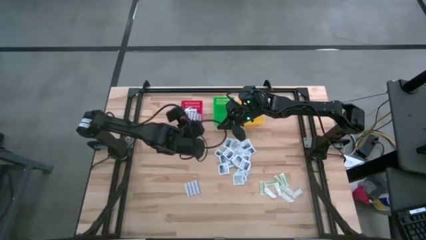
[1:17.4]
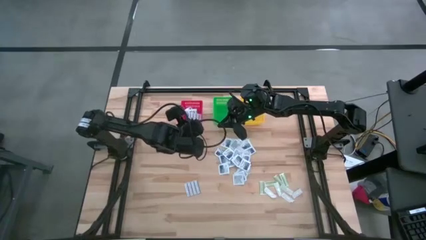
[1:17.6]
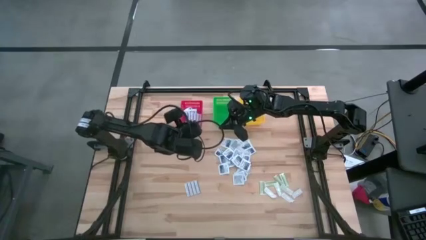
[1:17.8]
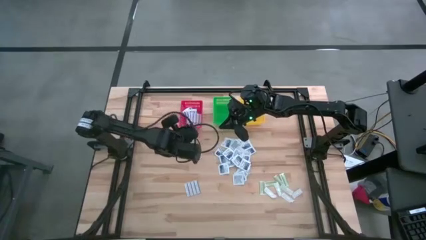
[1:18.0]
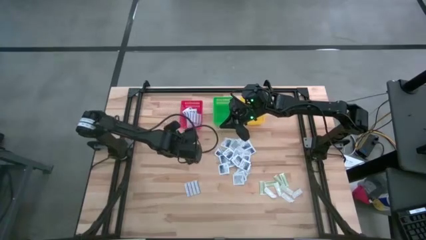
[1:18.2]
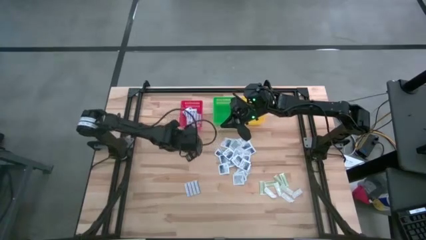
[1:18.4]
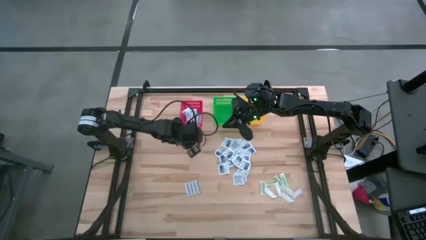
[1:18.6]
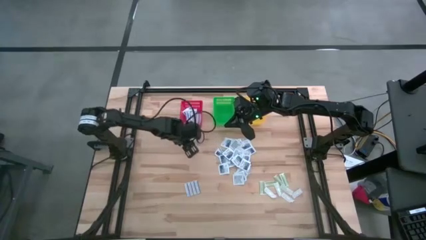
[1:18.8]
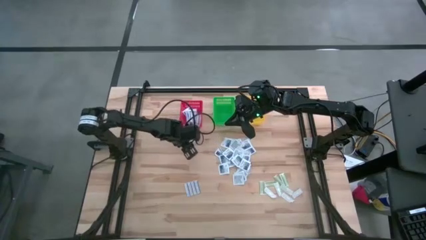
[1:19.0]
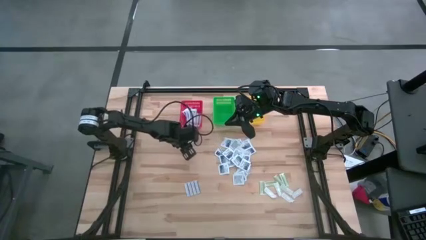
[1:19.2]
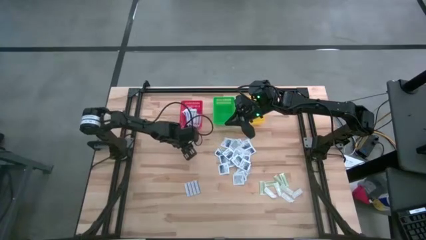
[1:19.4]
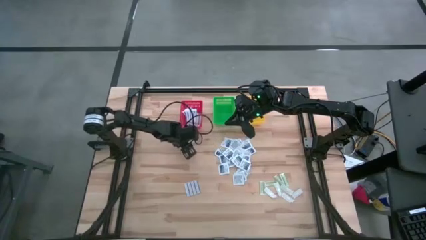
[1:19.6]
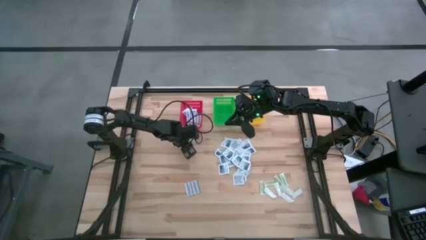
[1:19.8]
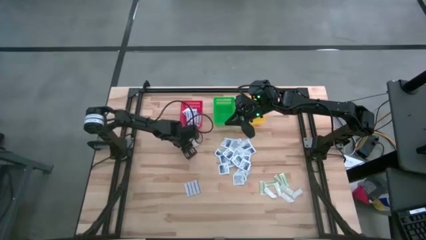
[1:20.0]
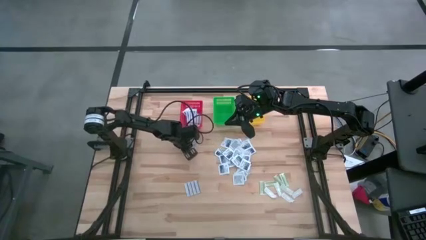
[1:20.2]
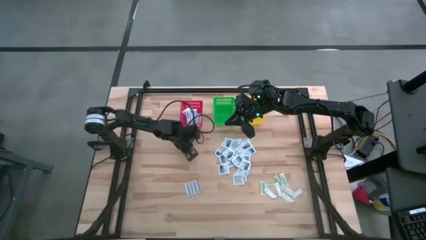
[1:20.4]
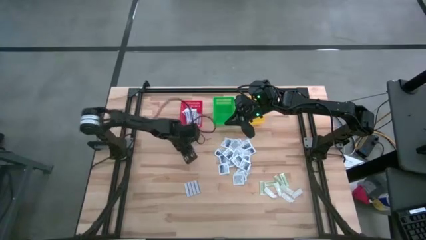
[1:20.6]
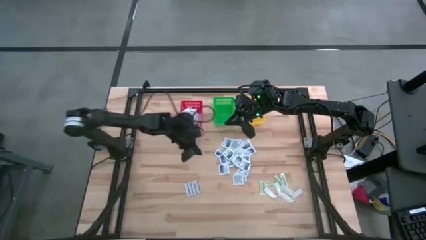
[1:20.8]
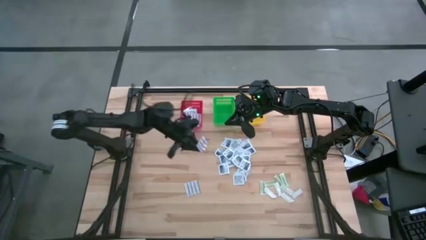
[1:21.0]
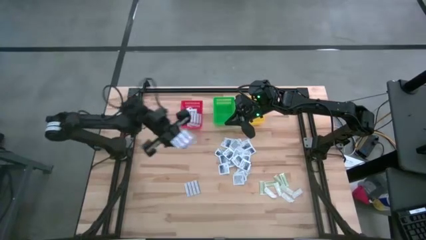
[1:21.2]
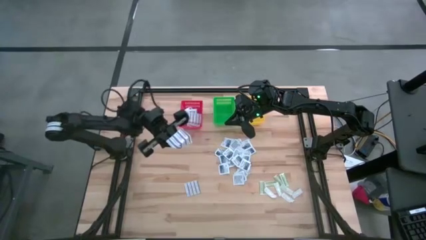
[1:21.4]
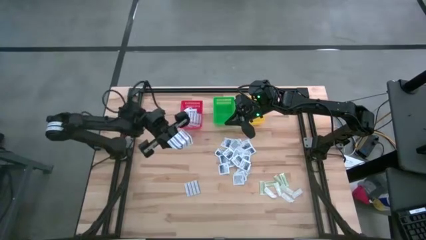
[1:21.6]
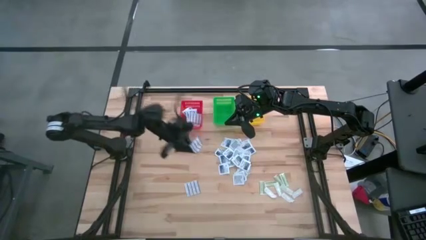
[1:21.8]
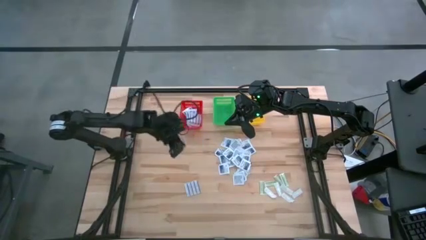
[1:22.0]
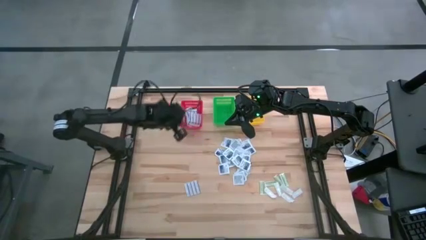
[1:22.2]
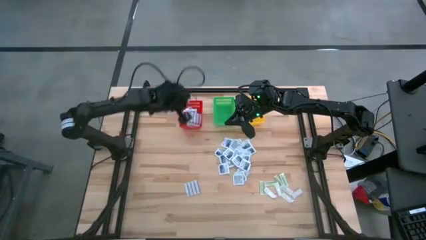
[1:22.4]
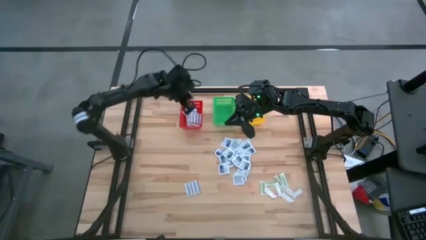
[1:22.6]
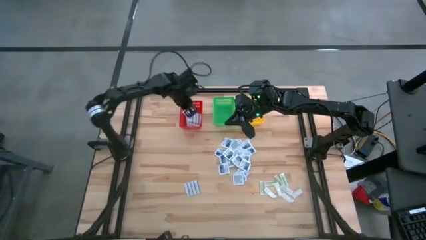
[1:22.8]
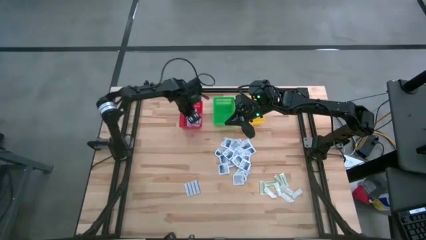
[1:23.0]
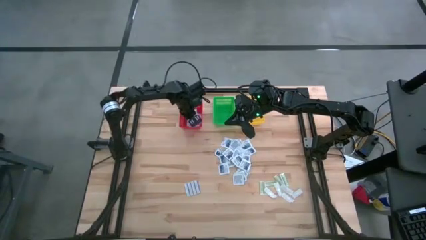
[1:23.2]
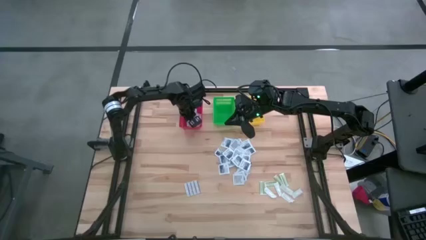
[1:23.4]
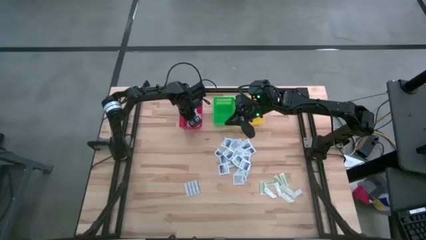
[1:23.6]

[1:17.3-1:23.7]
Task: Pick & Place First Aid Supplies
Put the blue bandage into the red basket

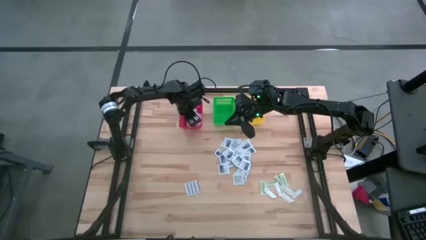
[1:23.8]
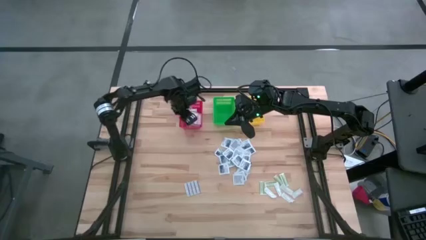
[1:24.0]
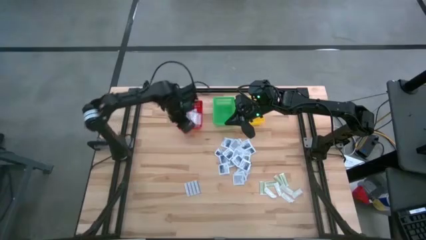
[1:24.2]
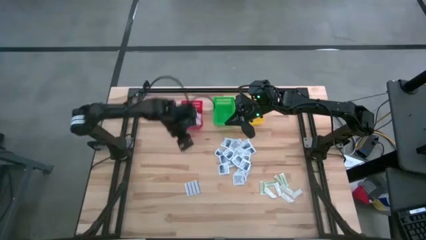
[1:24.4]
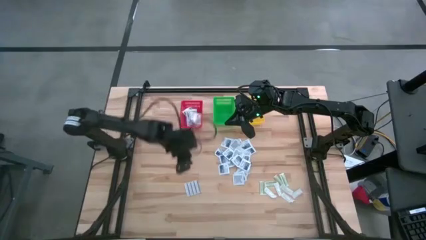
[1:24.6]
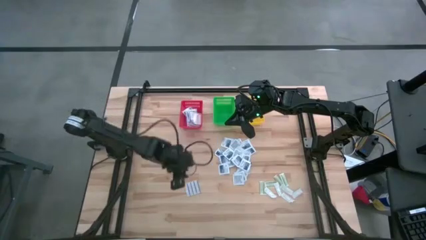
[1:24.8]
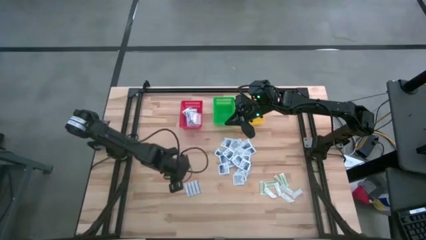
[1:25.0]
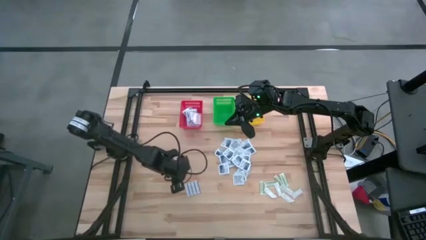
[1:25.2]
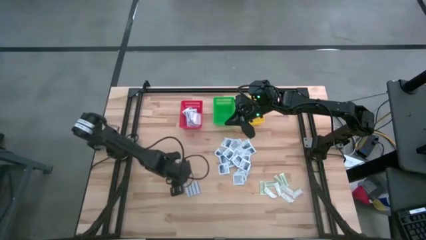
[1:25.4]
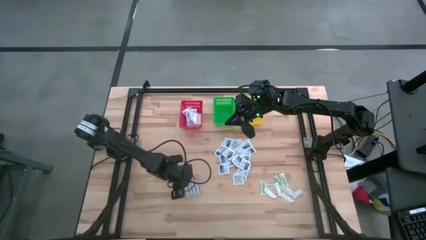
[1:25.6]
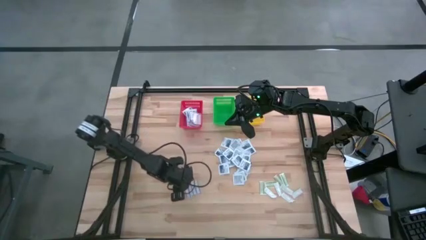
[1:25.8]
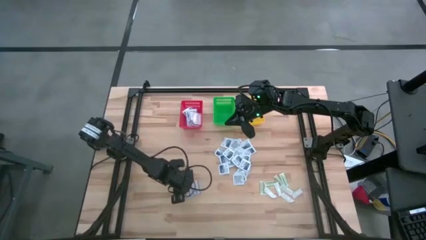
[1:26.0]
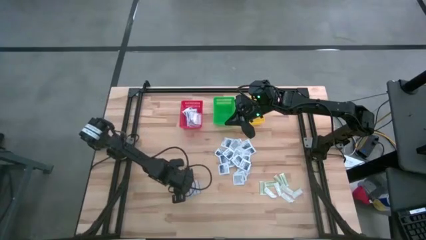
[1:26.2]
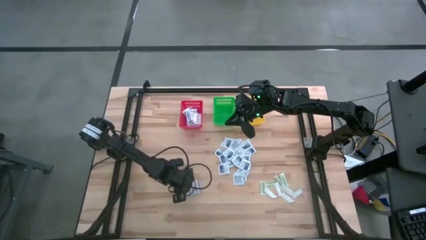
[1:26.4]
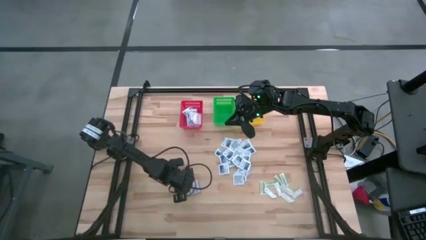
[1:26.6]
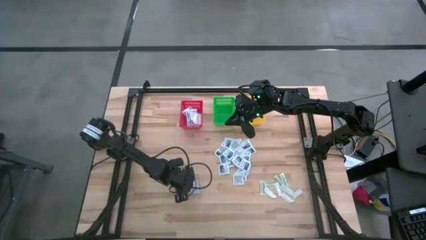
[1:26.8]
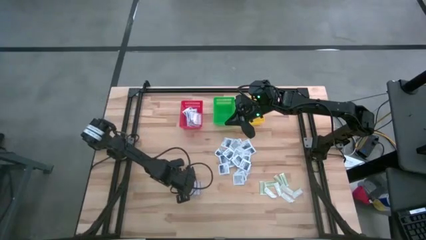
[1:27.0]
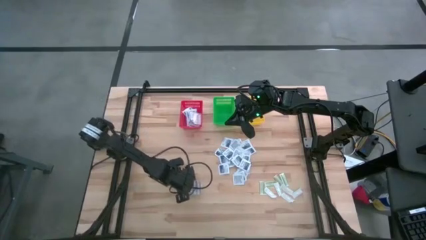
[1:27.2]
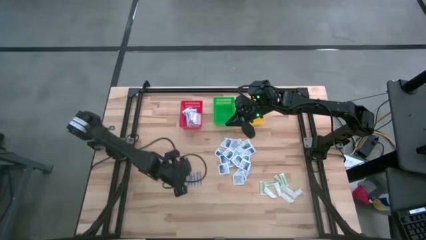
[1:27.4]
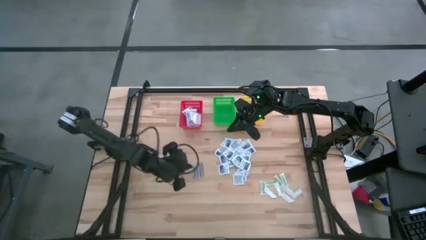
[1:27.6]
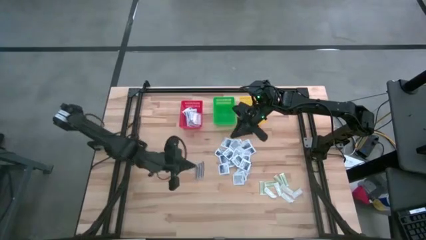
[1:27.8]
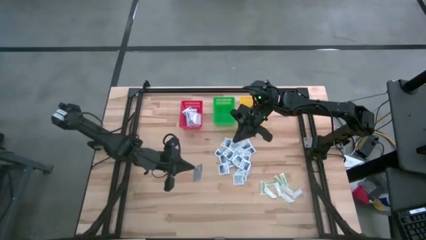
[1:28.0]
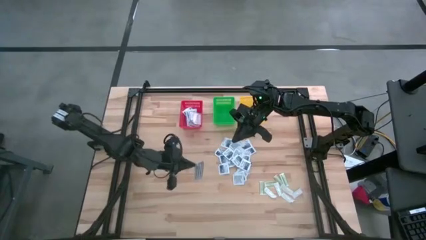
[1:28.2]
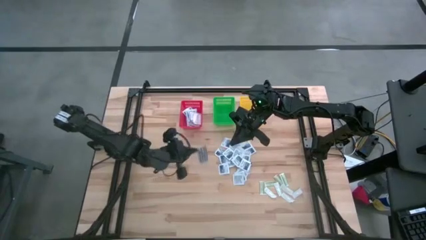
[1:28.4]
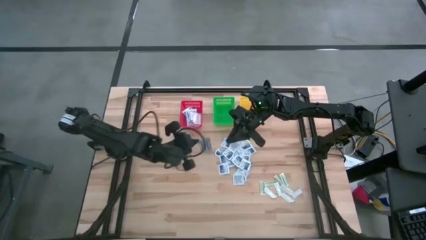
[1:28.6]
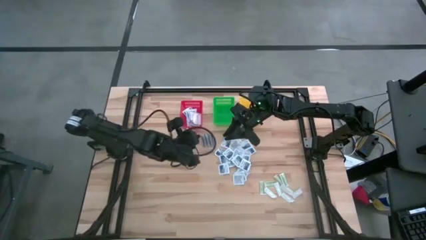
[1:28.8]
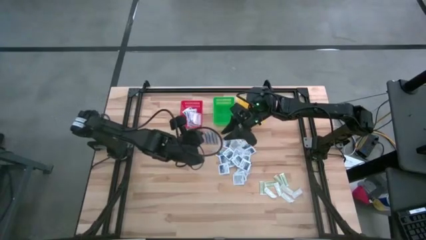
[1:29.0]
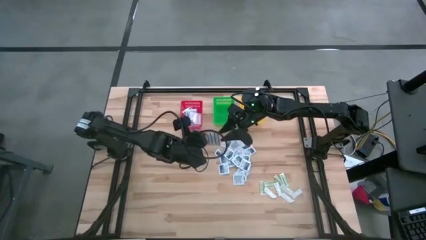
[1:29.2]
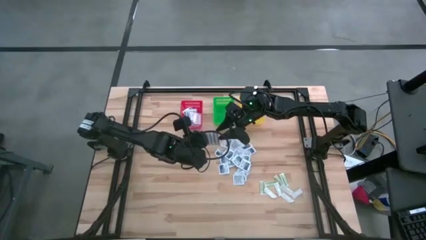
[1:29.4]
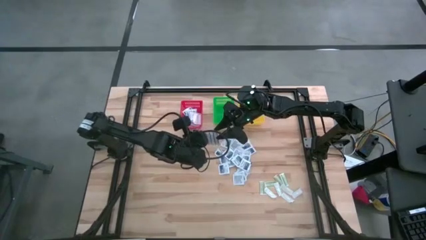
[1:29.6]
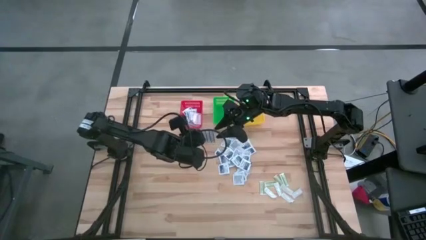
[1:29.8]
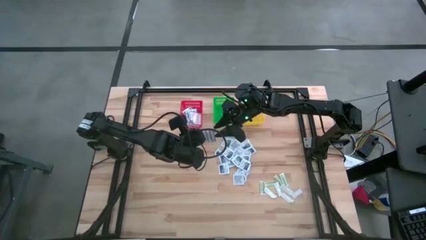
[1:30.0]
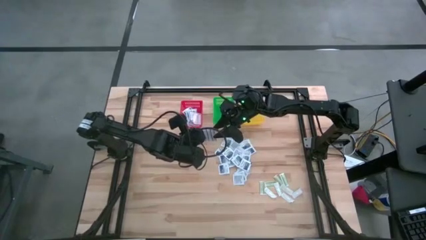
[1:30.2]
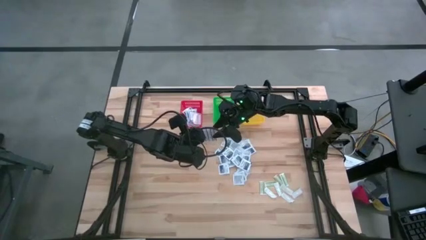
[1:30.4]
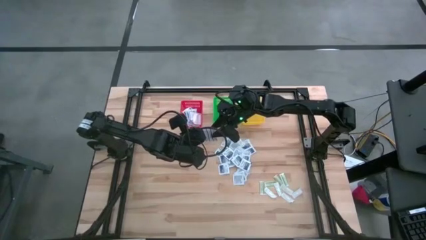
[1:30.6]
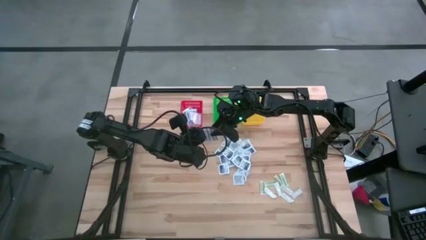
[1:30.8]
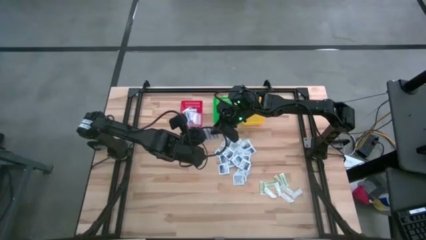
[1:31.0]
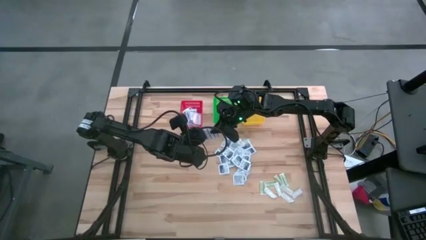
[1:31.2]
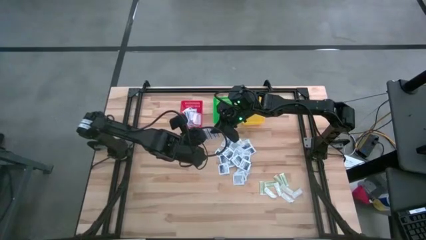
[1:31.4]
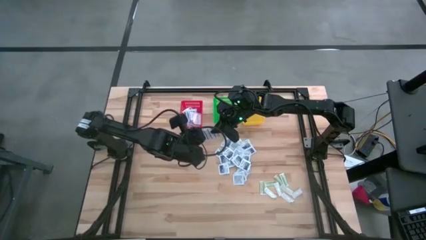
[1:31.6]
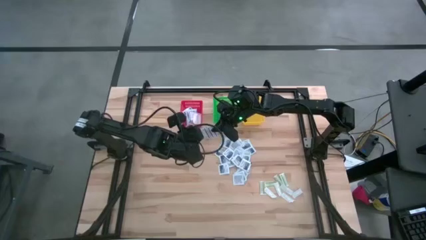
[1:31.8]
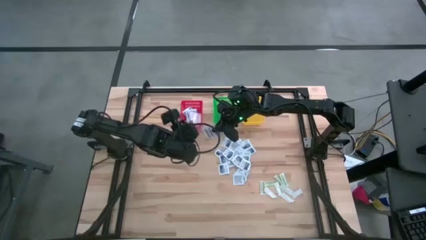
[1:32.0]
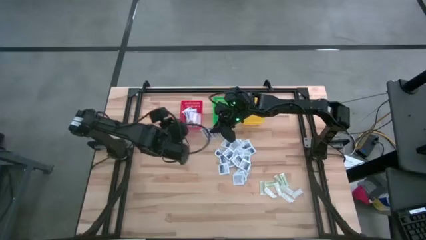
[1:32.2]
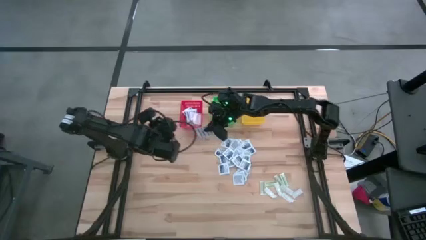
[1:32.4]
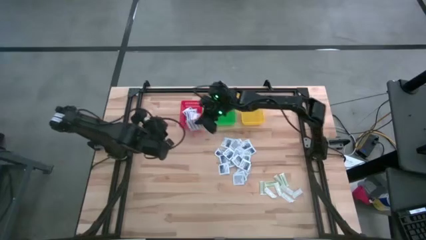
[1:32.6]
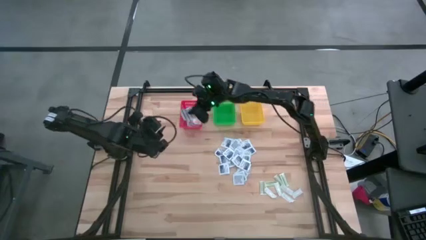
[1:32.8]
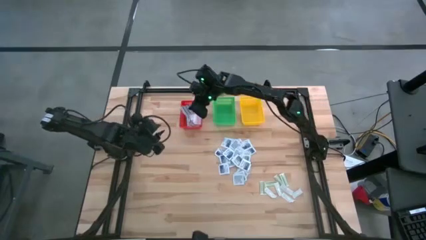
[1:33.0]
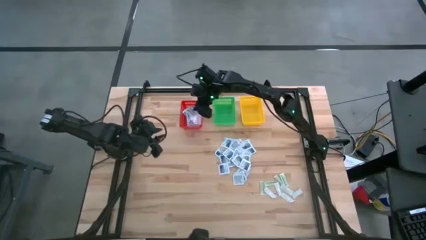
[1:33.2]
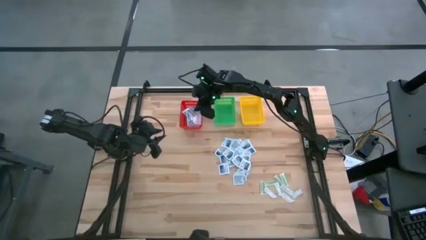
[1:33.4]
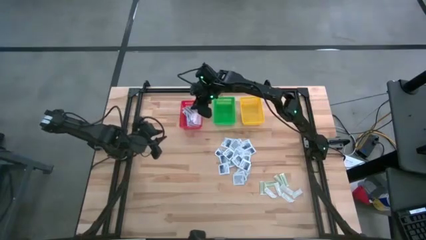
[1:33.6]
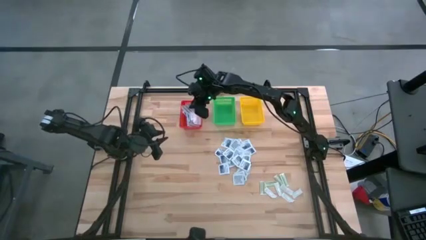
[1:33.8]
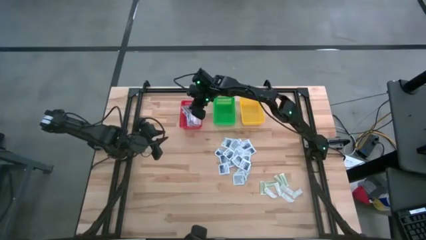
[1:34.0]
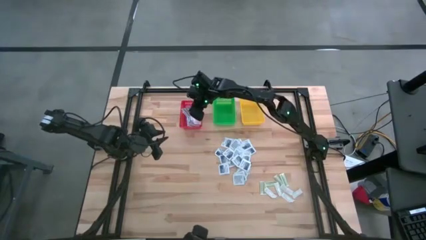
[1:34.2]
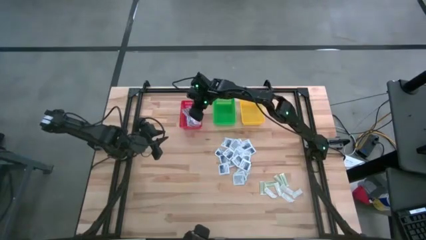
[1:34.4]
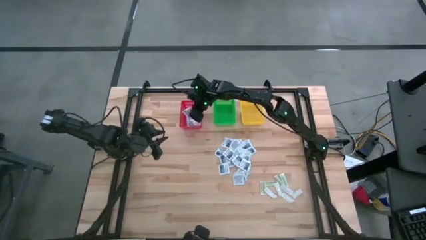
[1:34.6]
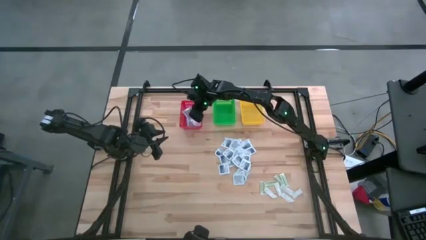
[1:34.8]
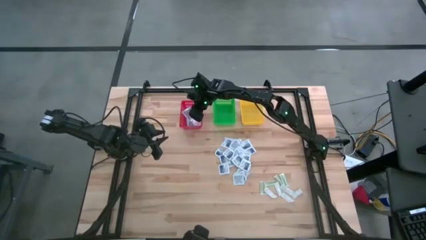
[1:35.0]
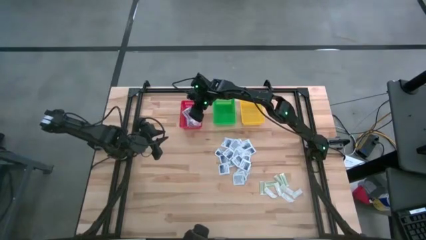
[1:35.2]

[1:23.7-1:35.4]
Put the blue bandage into the red basket
